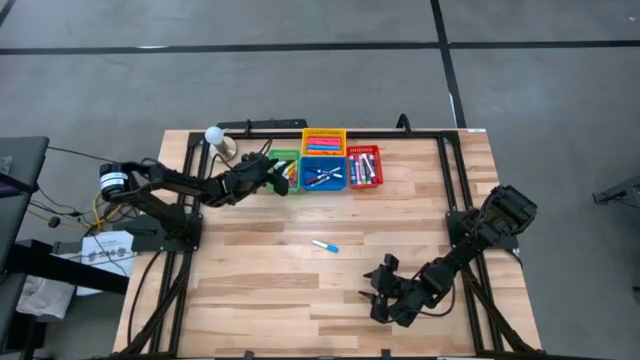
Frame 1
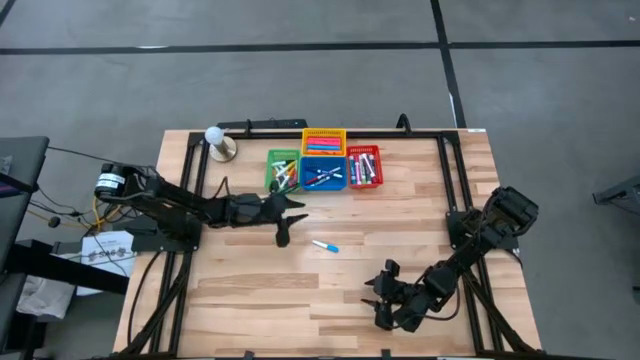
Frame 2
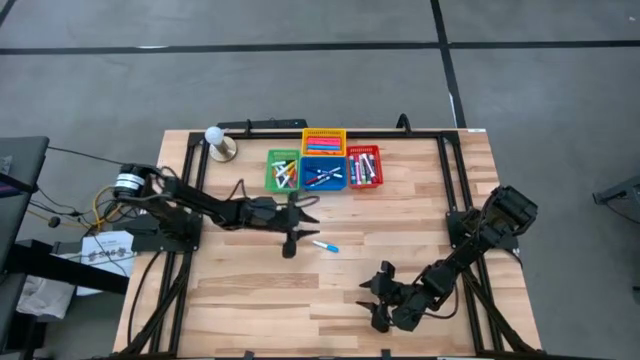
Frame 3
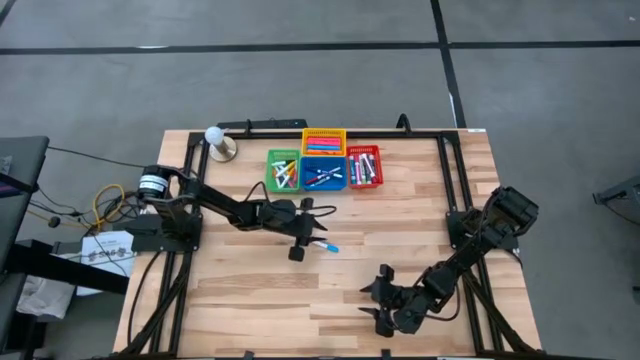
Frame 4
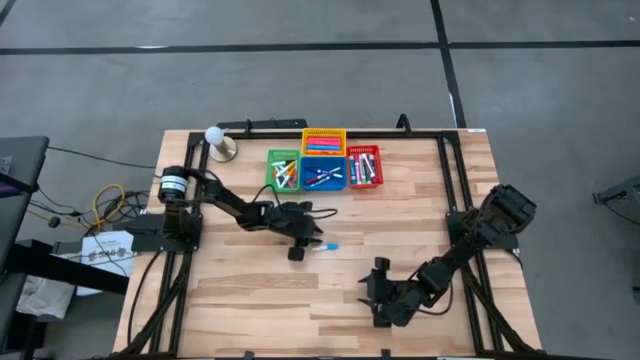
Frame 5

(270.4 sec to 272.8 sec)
Task: Pick & Place Markers
Put the small blue highlighter pen into the green bin

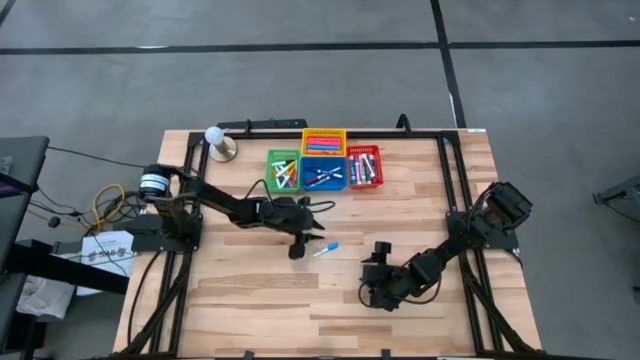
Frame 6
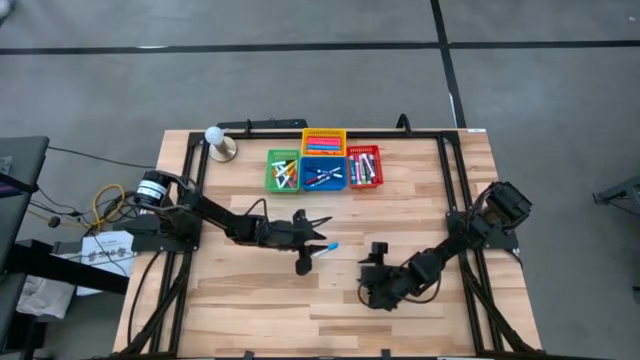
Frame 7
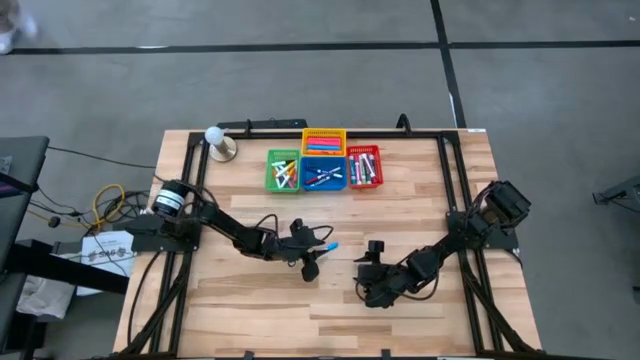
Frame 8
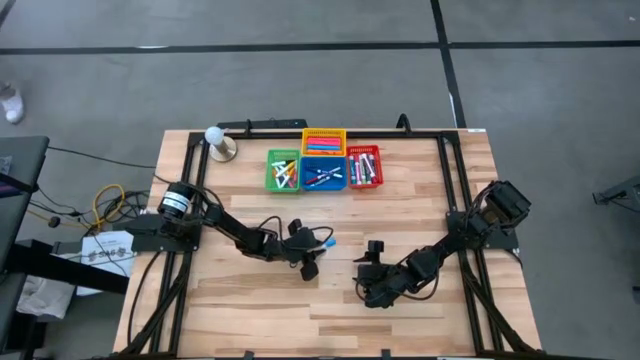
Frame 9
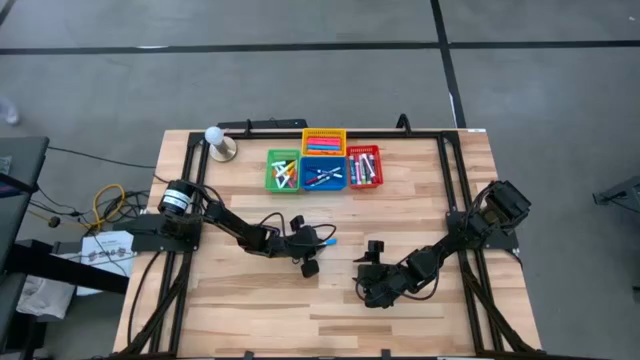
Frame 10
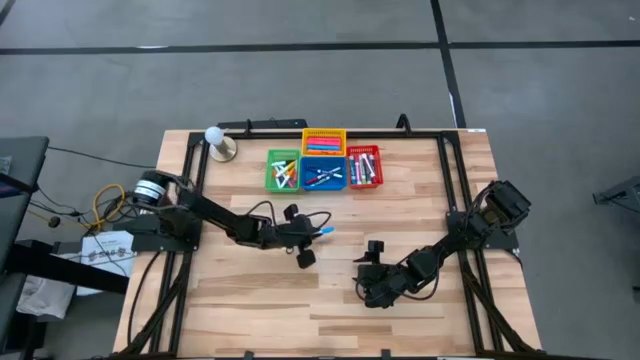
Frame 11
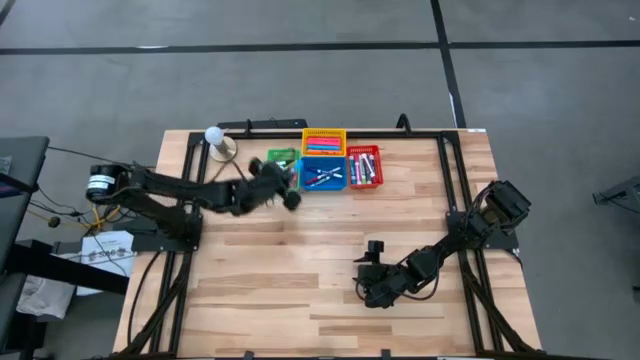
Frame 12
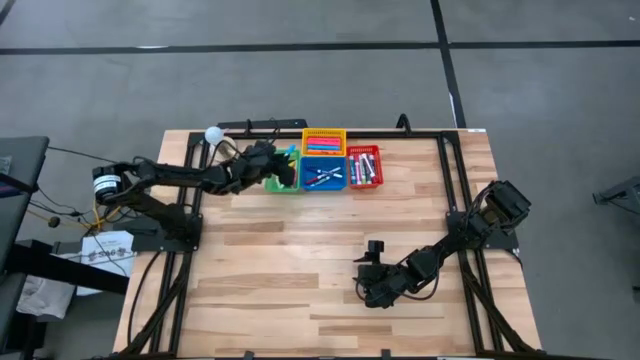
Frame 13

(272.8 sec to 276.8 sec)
Put the small blue highlighter pen into the green bin

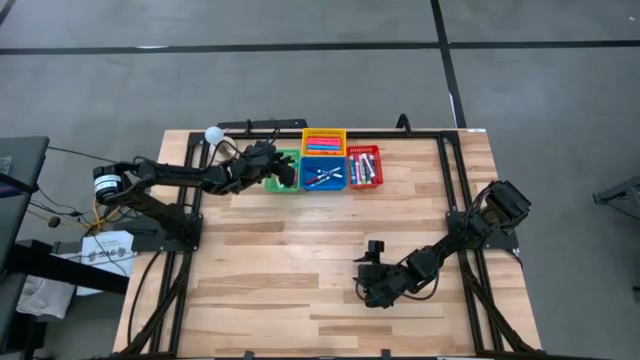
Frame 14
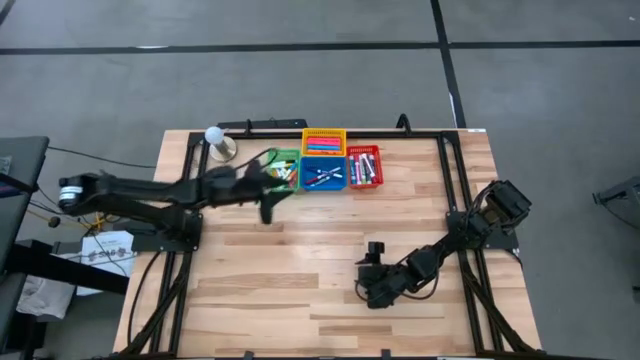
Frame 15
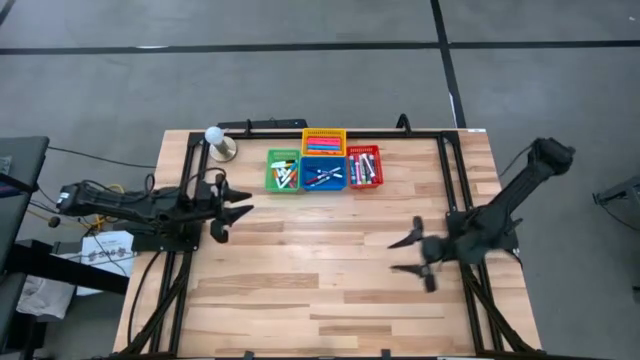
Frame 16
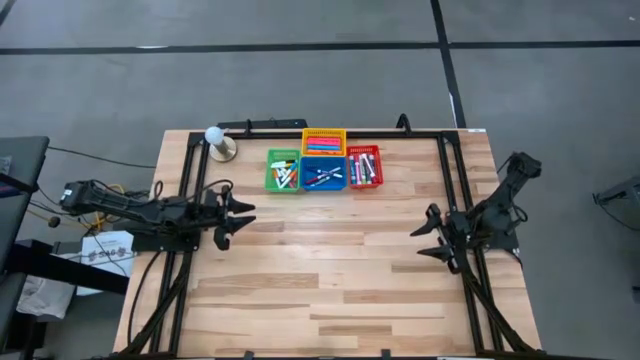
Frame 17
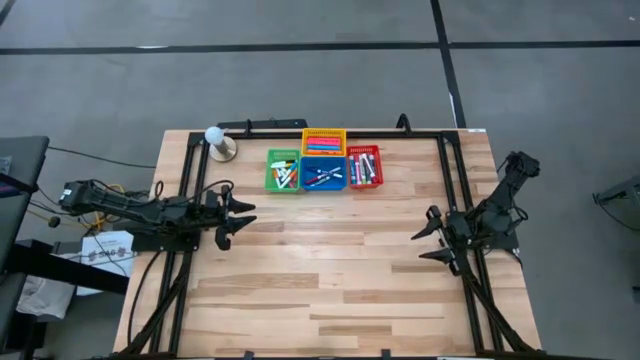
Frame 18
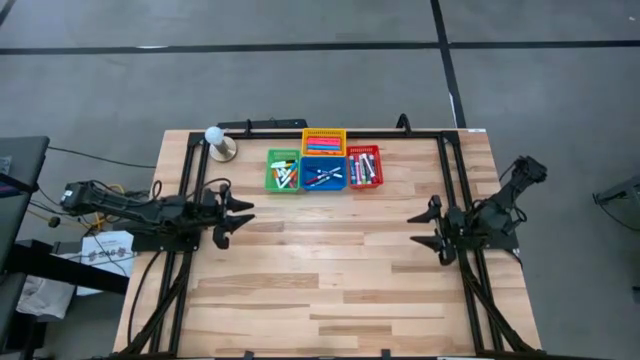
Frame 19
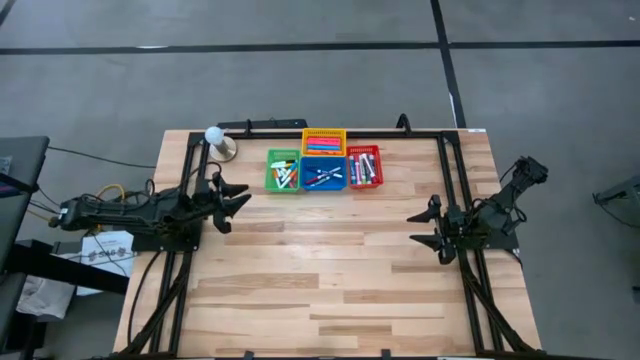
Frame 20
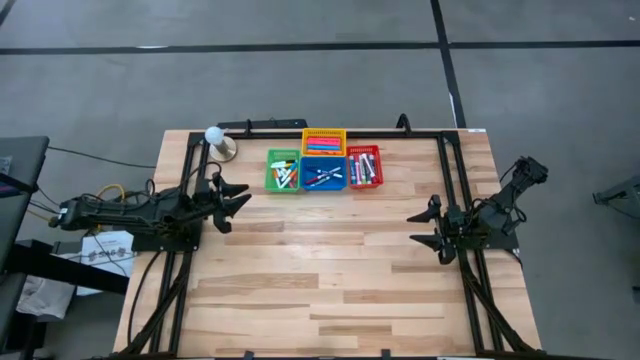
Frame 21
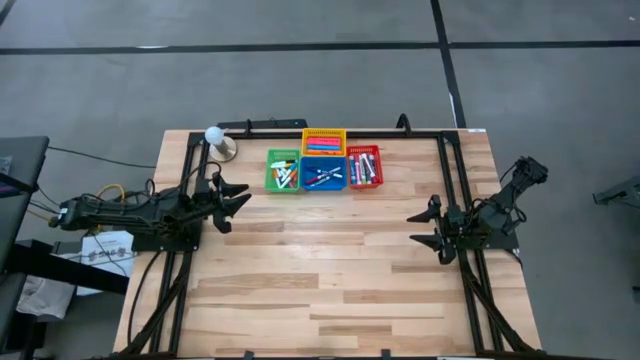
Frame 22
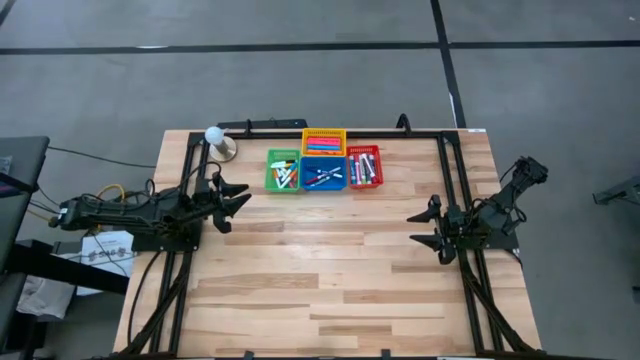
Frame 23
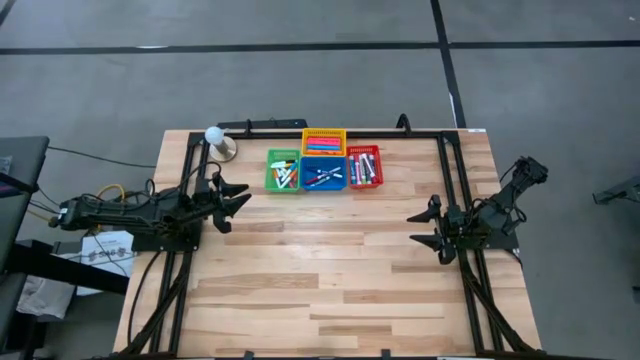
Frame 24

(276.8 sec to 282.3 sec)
Return to Home Position

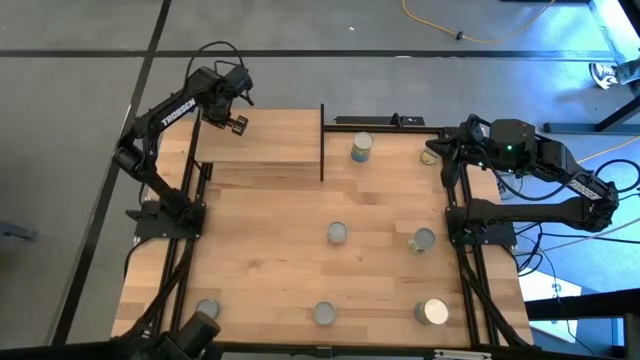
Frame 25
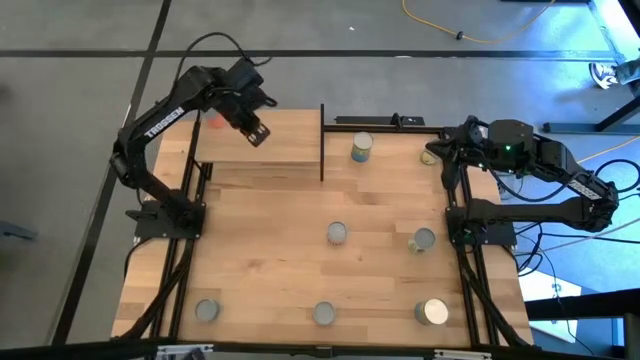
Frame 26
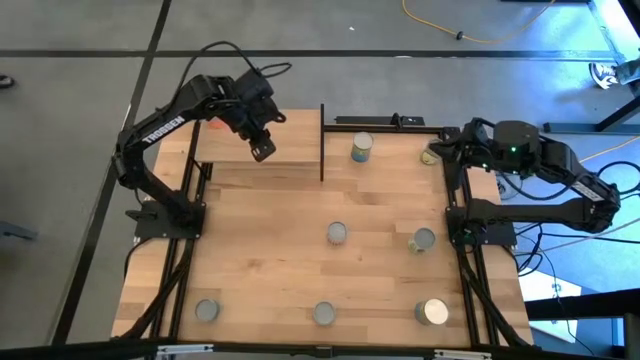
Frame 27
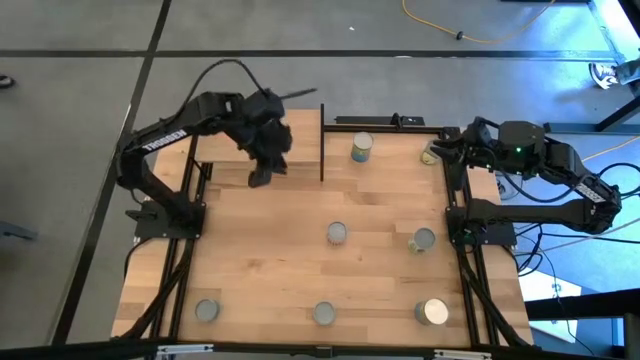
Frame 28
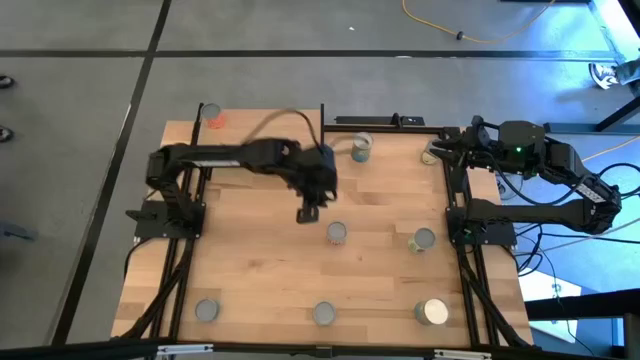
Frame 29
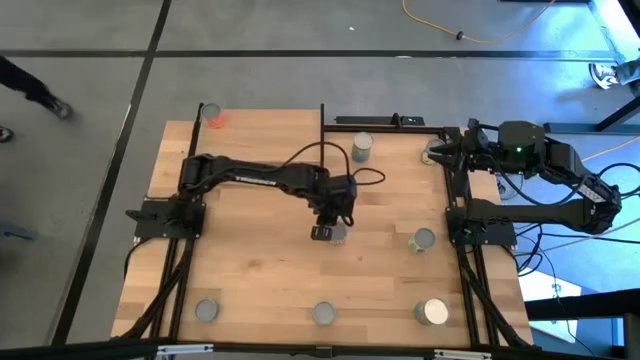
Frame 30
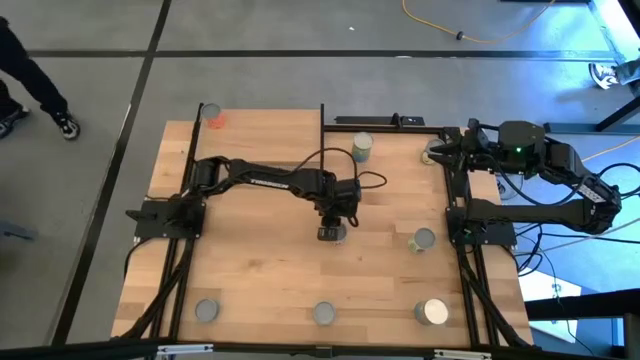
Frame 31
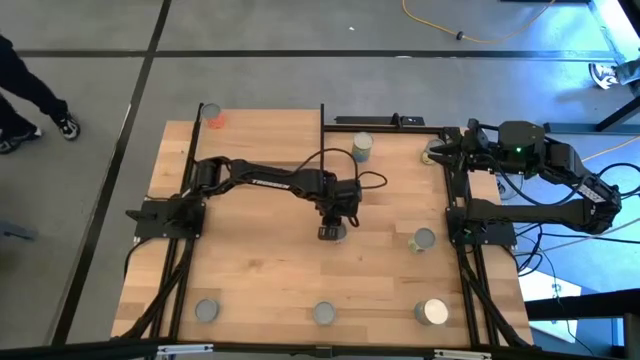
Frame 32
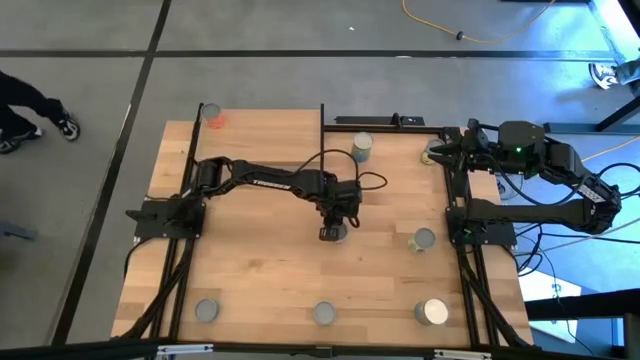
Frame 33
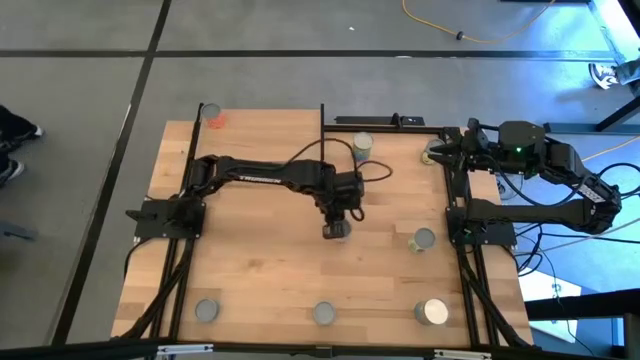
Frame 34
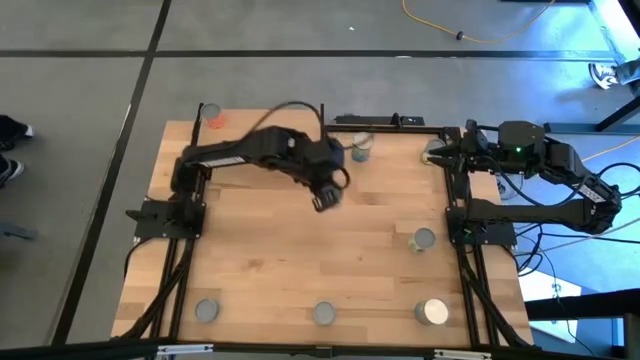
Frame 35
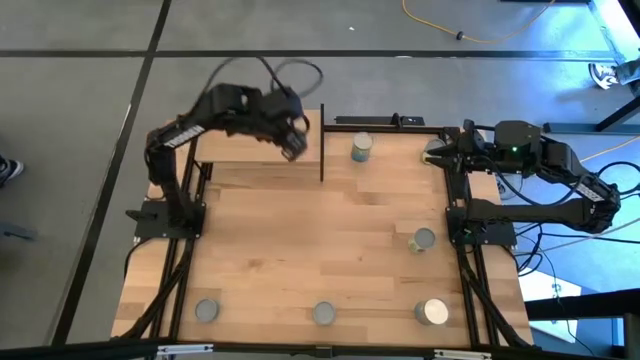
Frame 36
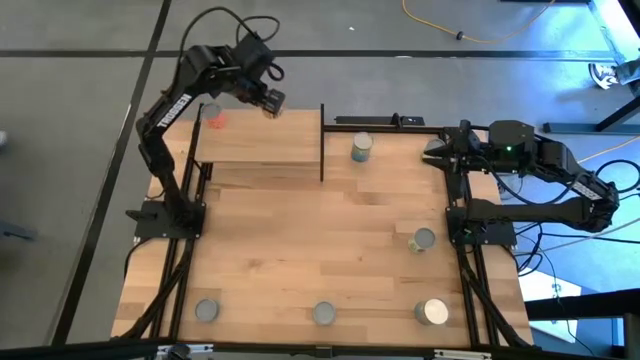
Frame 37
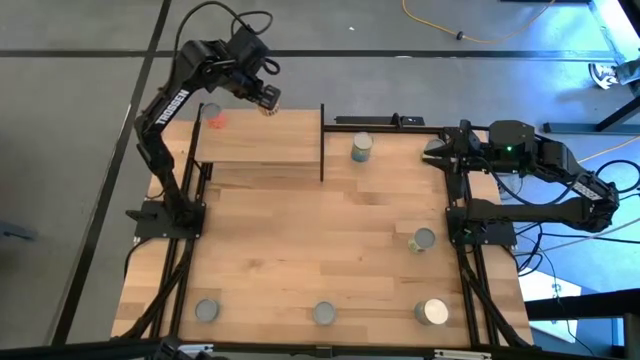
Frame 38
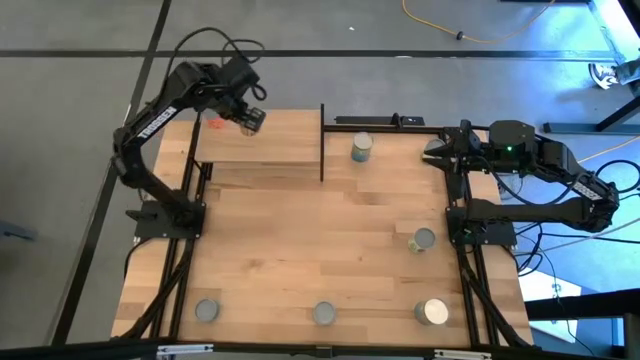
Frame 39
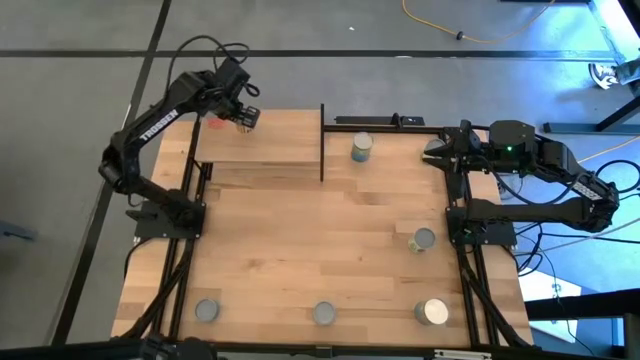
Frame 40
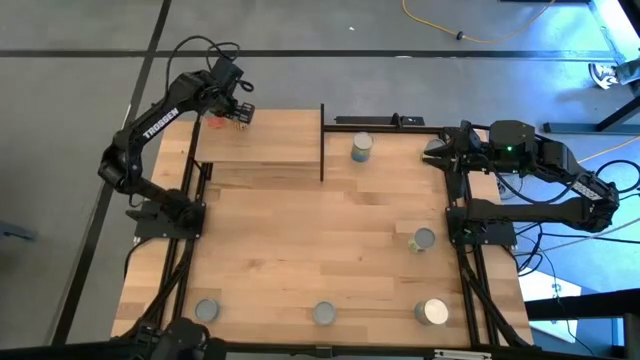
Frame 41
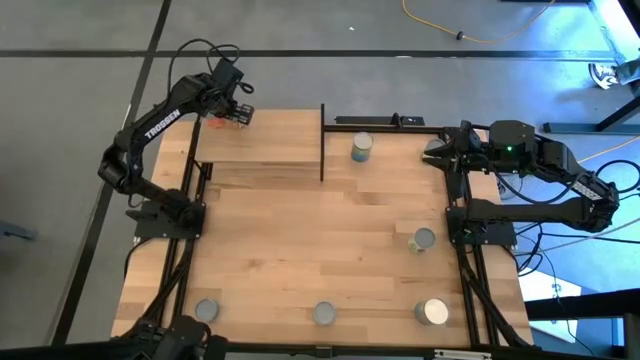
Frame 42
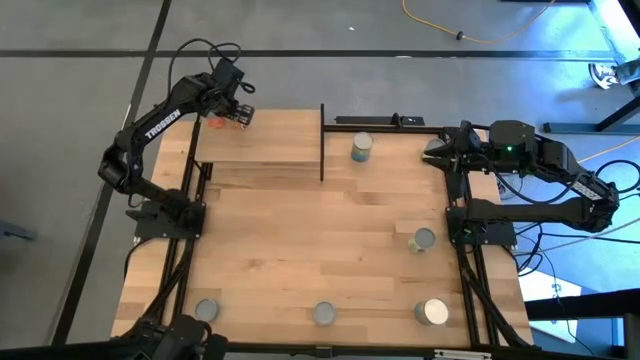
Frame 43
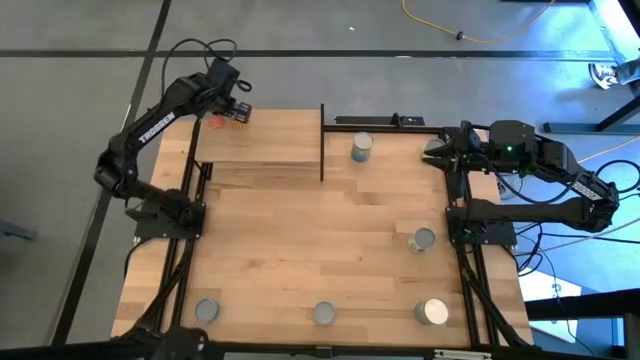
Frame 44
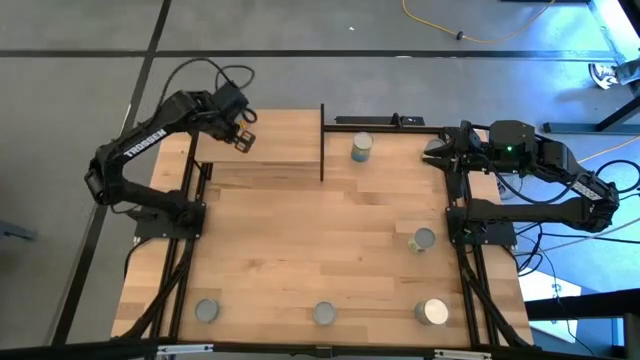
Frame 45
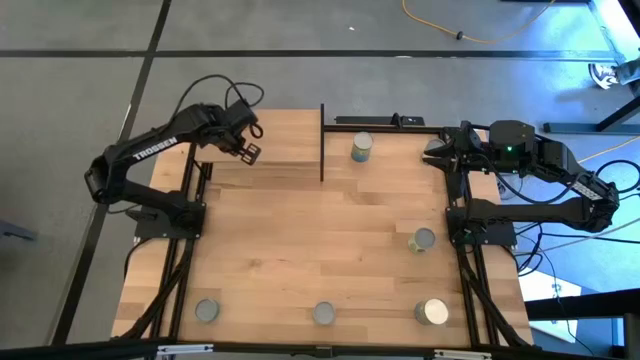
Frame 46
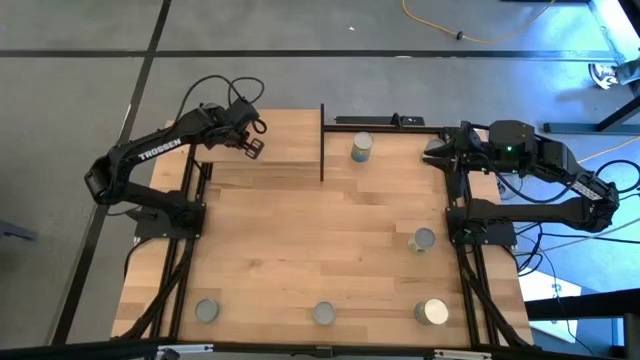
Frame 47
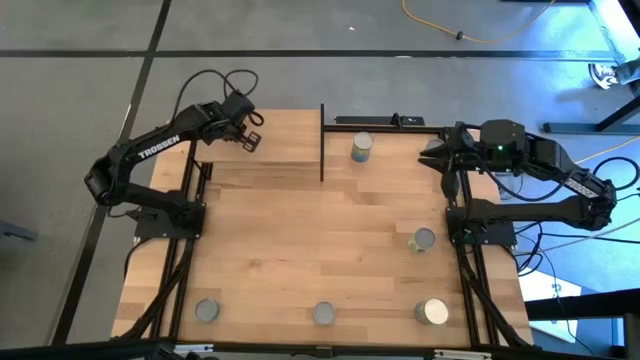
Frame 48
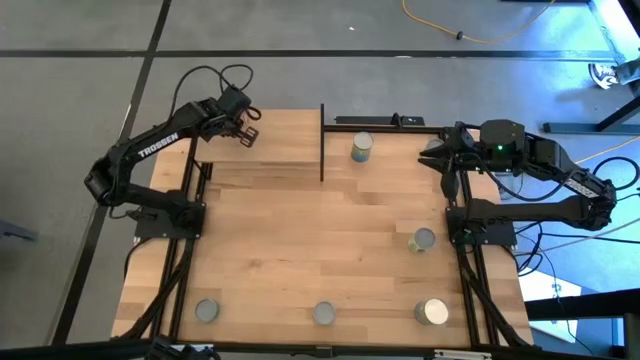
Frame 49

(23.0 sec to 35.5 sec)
Task: Pick and place cans onto a shelf
Put the canned black beans on the shelf
